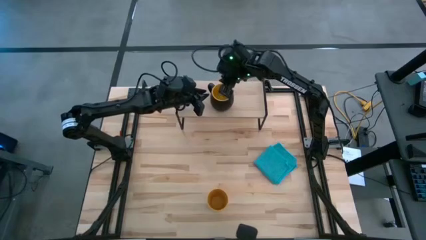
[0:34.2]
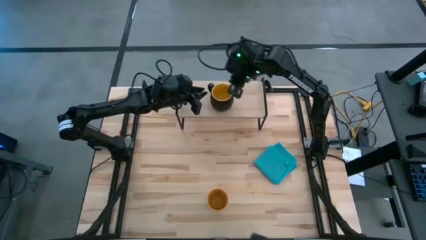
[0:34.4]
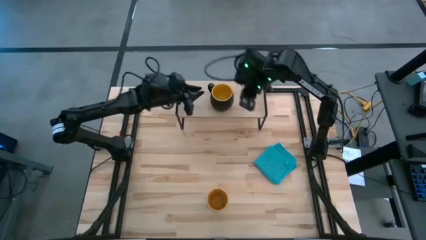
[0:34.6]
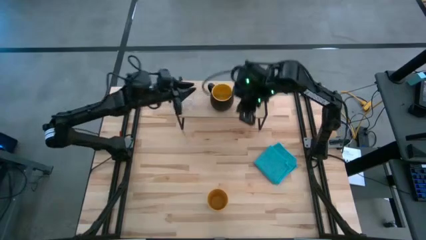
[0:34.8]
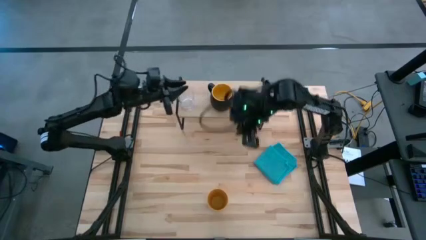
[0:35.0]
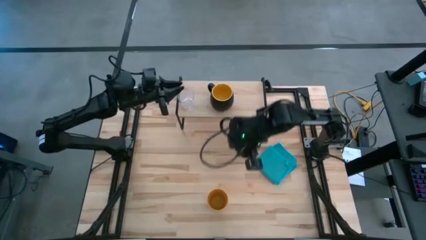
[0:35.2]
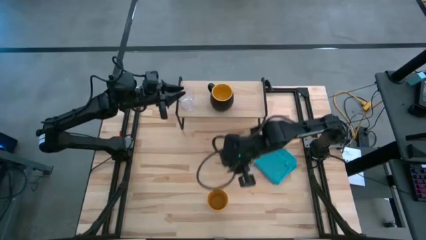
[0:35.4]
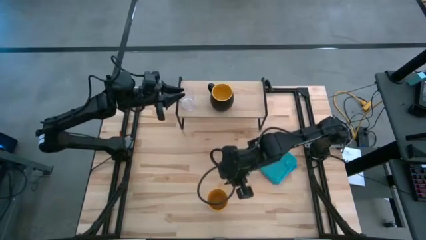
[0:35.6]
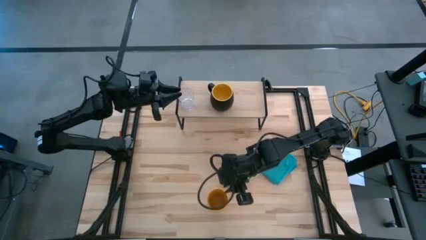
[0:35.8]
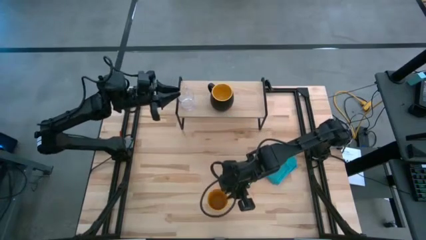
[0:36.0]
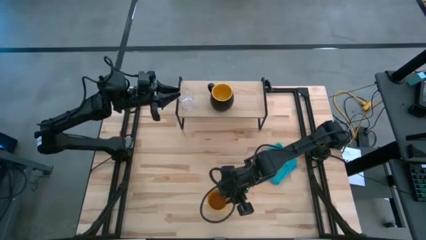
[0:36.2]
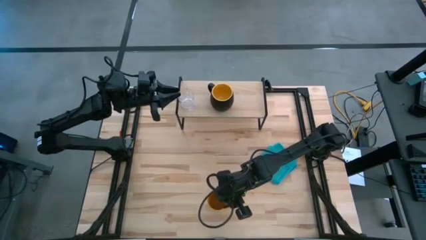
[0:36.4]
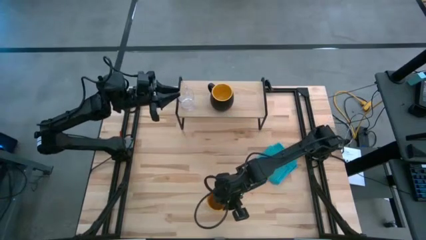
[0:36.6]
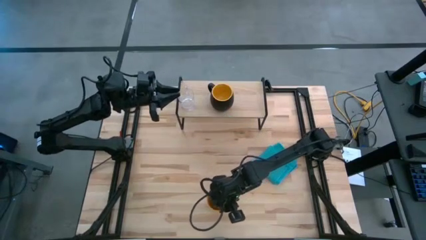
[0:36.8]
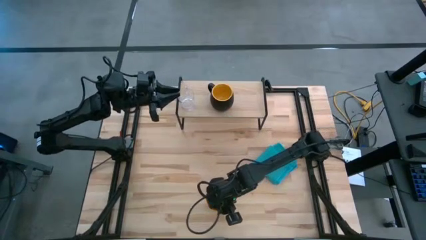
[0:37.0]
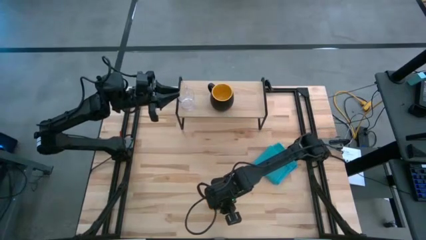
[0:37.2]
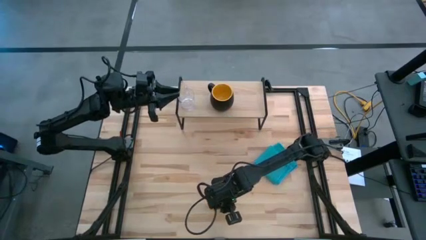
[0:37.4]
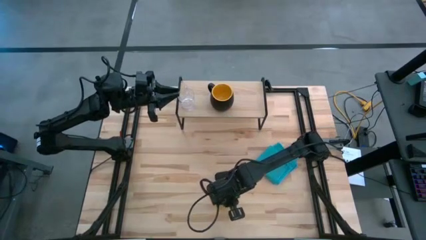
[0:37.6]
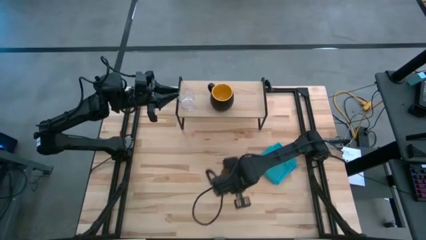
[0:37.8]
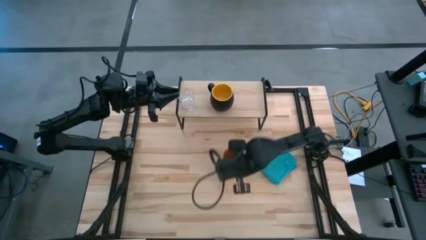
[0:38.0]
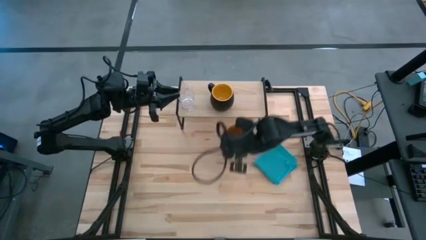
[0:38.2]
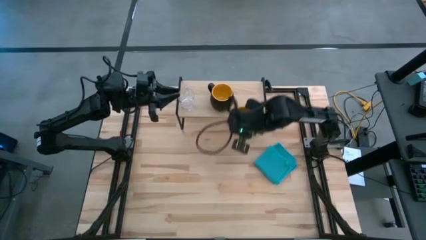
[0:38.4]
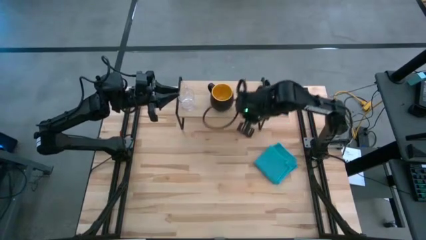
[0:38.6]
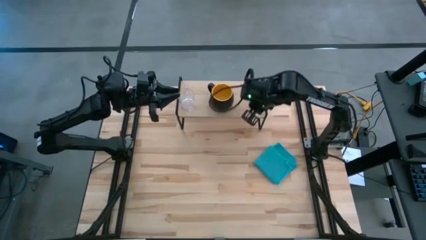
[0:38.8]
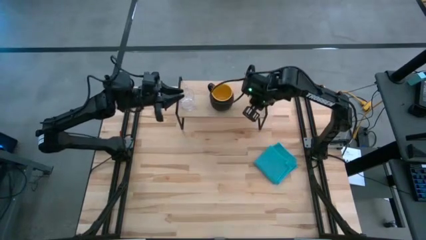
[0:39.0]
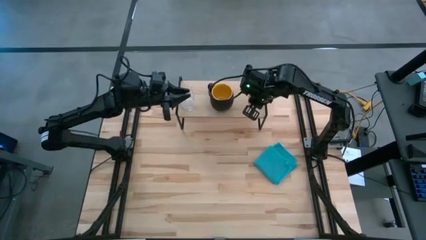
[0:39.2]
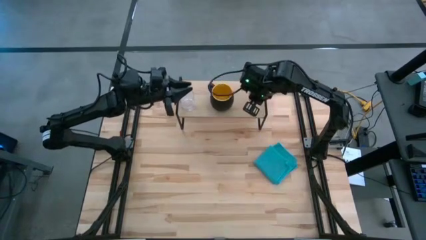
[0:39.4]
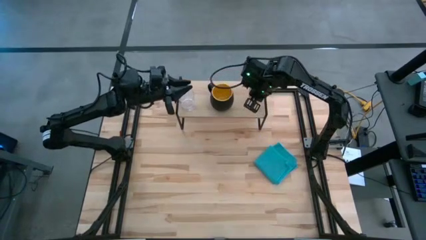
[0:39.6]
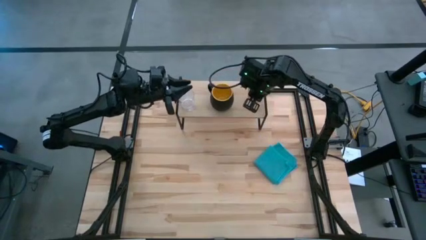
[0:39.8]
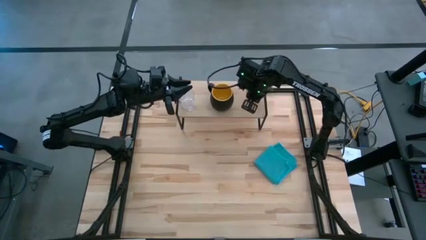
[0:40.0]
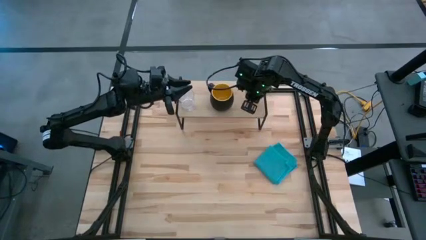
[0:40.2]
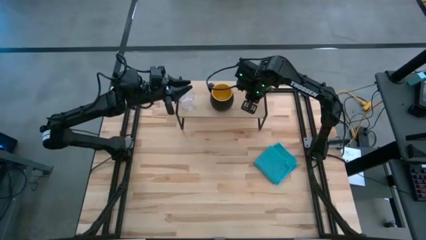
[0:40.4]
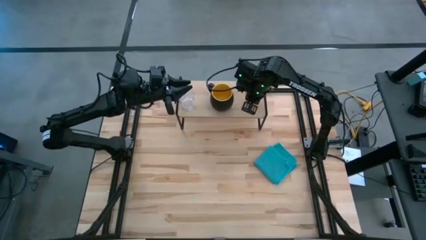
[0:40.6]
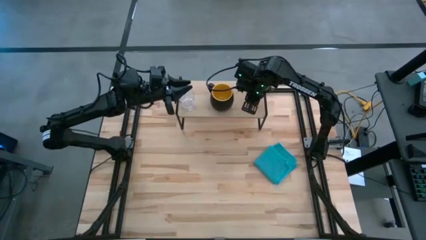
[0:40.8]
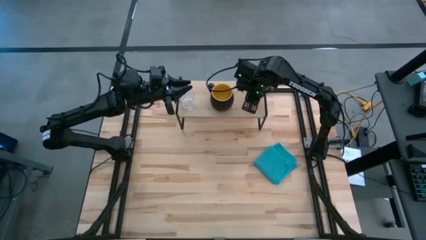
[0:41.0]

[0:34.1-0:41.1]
Task: Stack small to large cups/mugs on shelf
Put the yellow cup on the shelf

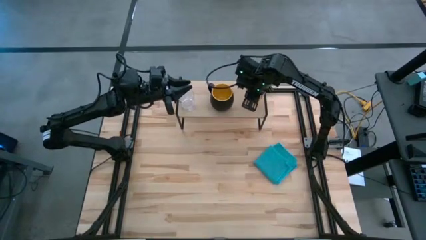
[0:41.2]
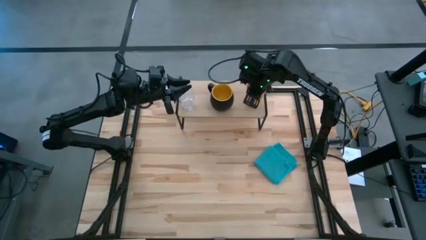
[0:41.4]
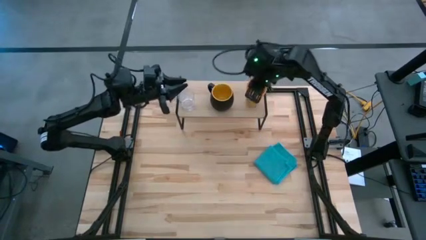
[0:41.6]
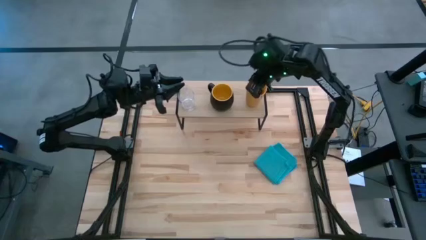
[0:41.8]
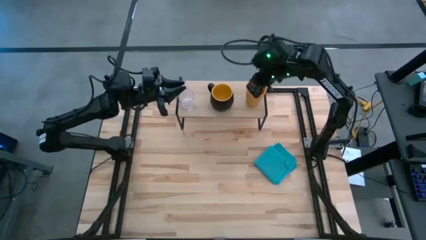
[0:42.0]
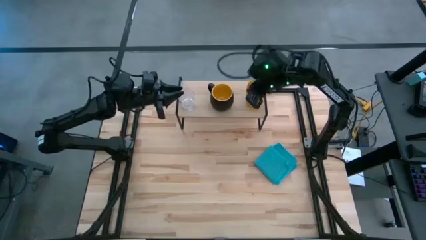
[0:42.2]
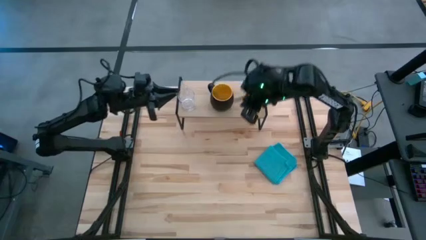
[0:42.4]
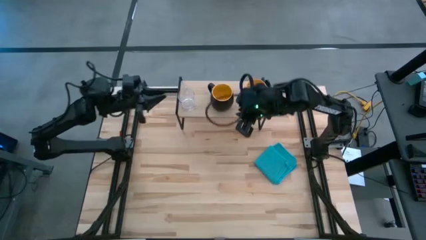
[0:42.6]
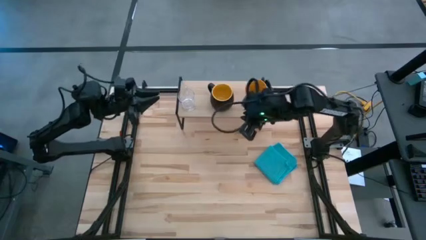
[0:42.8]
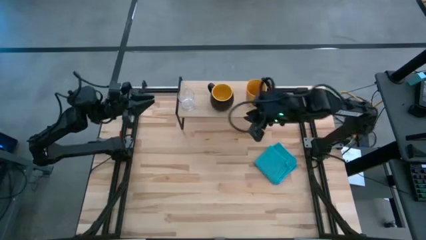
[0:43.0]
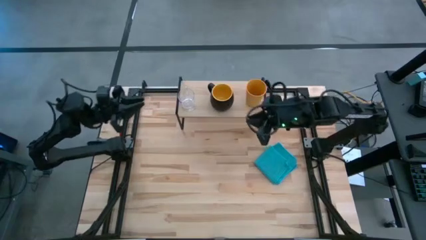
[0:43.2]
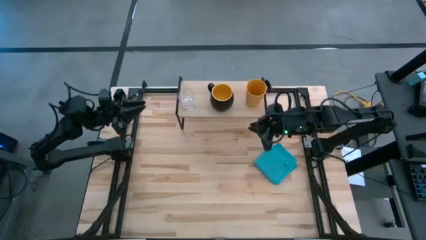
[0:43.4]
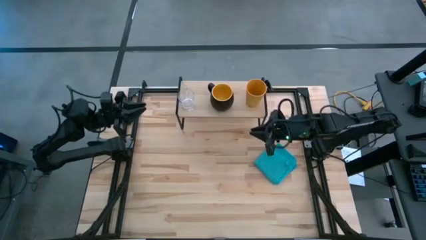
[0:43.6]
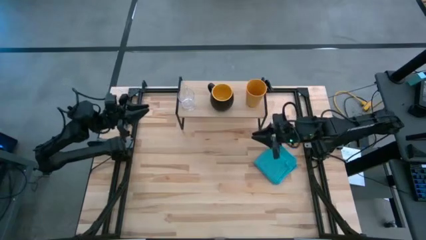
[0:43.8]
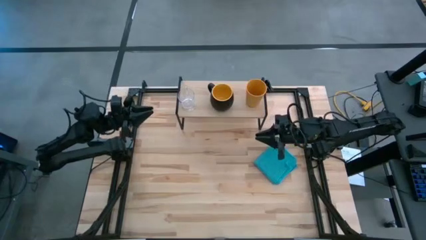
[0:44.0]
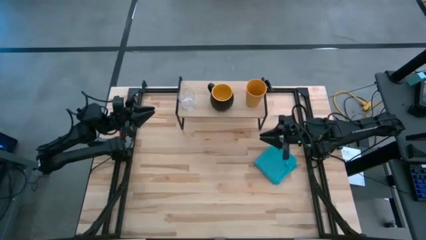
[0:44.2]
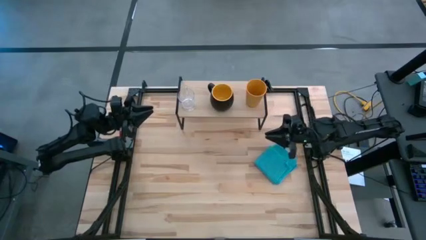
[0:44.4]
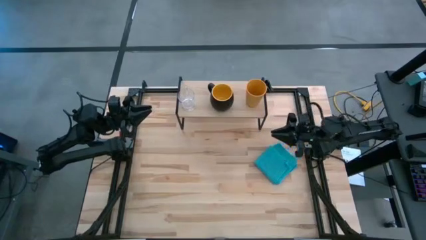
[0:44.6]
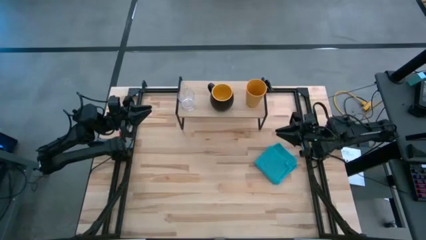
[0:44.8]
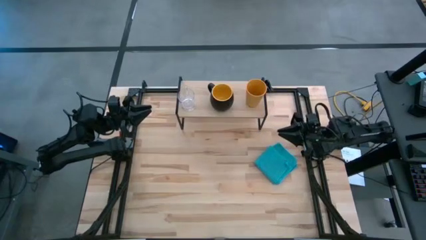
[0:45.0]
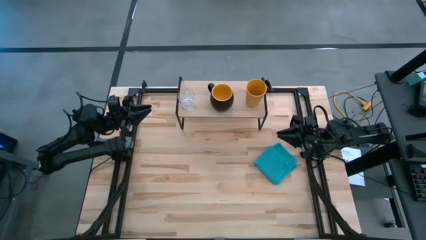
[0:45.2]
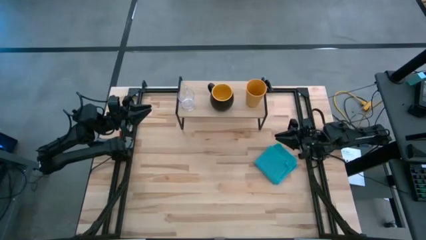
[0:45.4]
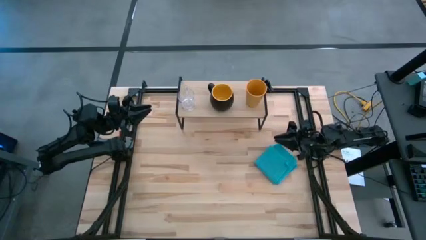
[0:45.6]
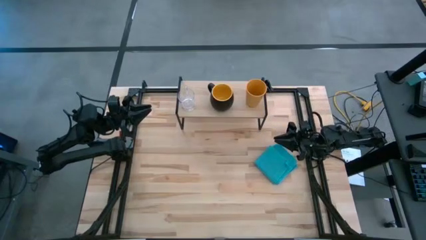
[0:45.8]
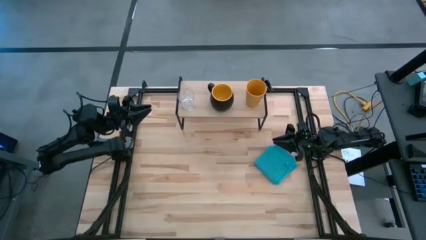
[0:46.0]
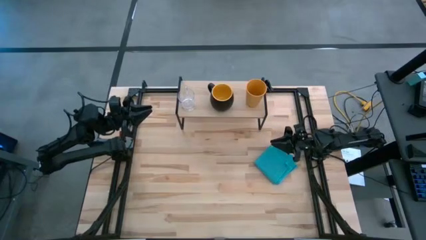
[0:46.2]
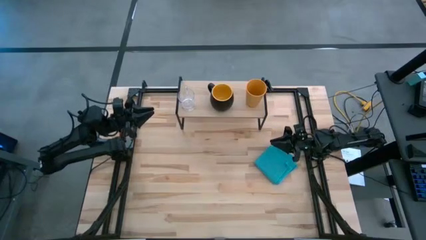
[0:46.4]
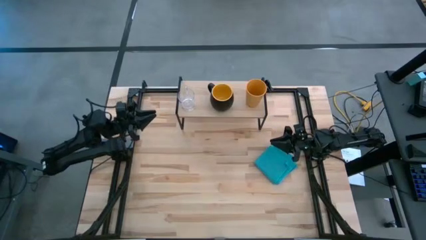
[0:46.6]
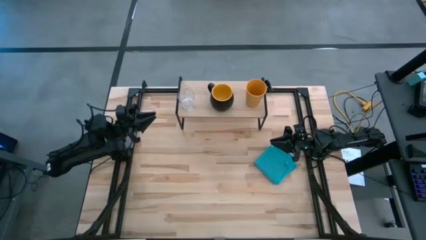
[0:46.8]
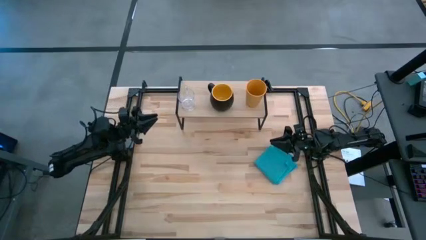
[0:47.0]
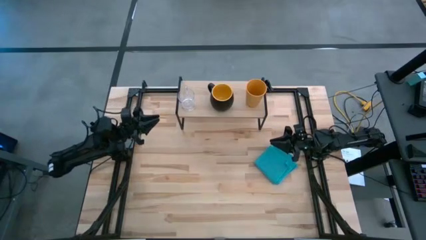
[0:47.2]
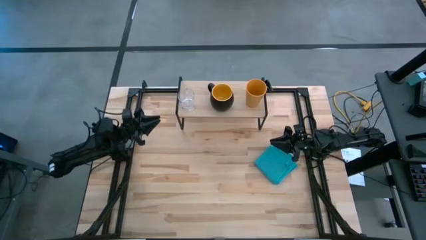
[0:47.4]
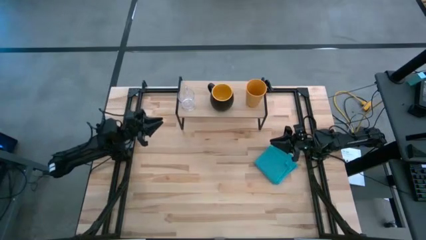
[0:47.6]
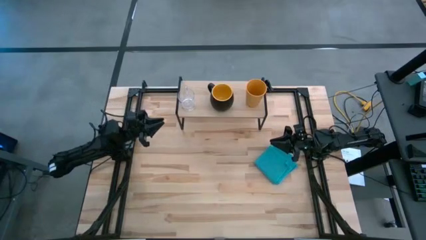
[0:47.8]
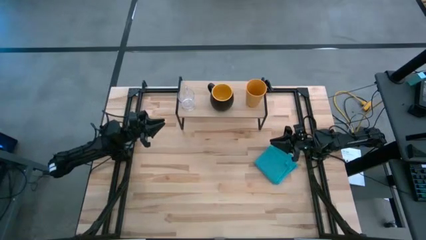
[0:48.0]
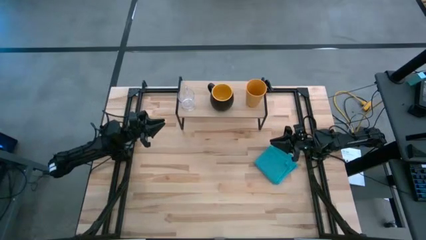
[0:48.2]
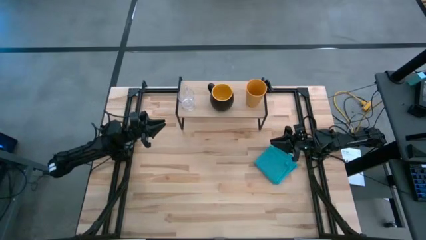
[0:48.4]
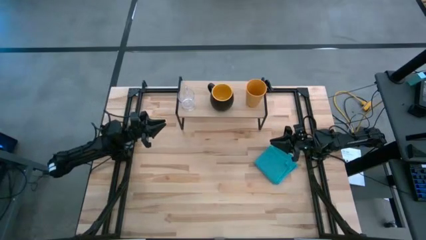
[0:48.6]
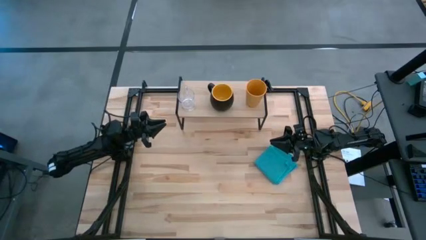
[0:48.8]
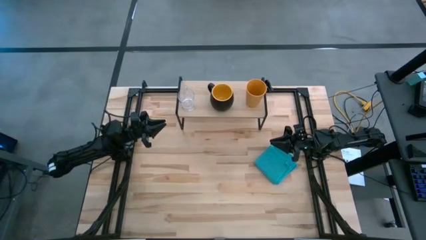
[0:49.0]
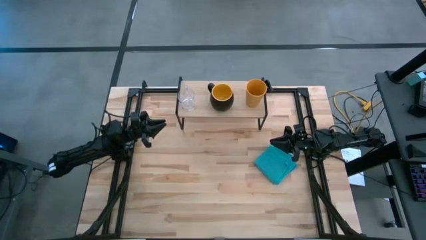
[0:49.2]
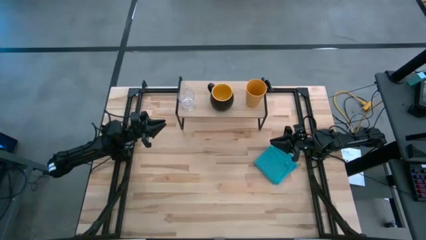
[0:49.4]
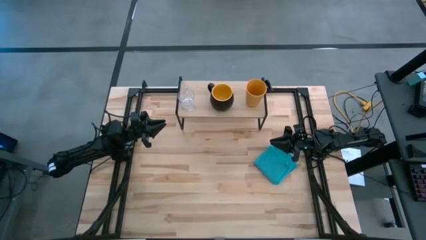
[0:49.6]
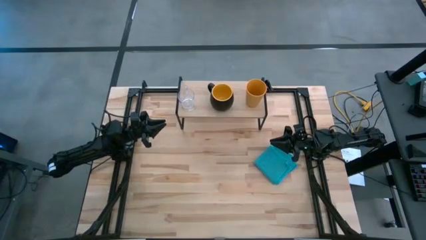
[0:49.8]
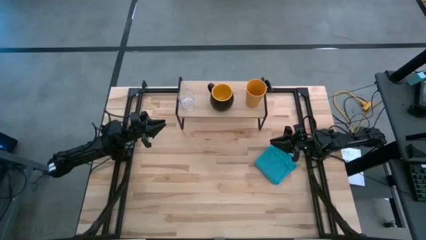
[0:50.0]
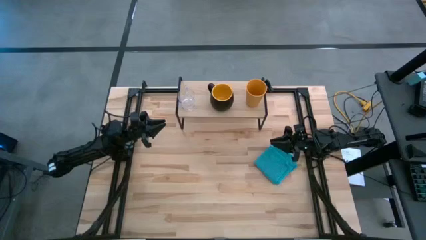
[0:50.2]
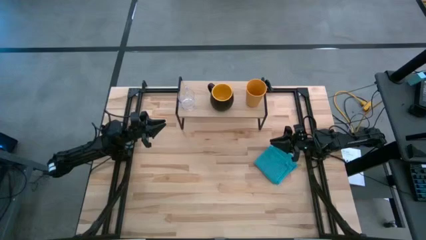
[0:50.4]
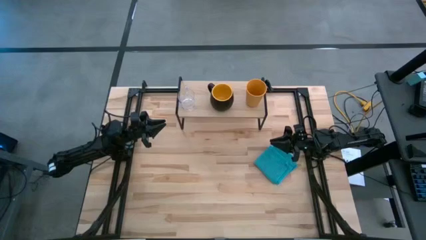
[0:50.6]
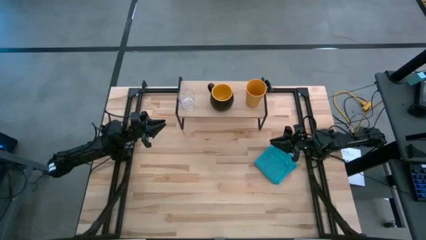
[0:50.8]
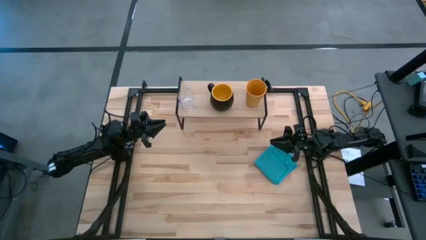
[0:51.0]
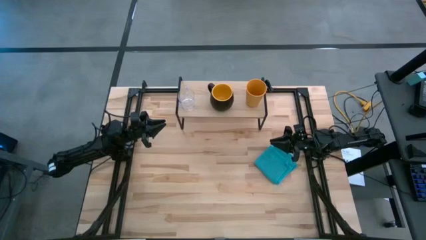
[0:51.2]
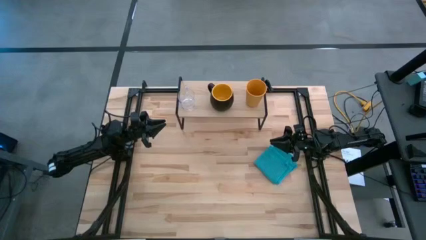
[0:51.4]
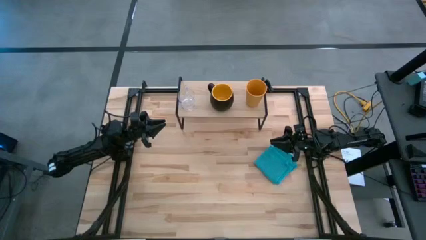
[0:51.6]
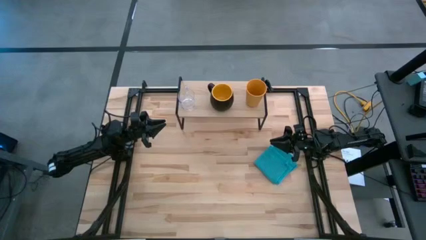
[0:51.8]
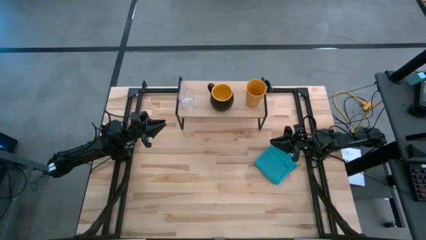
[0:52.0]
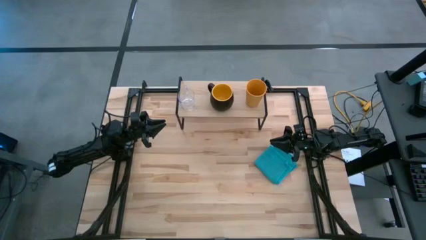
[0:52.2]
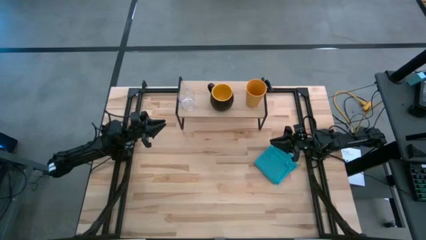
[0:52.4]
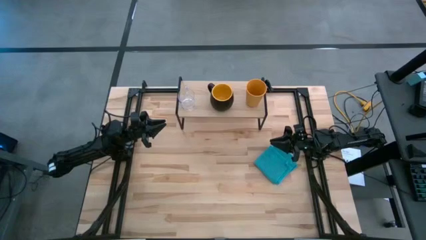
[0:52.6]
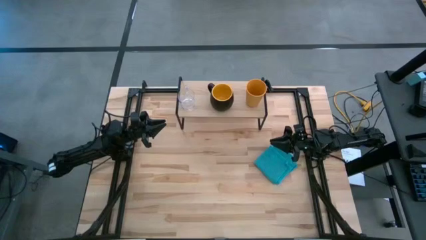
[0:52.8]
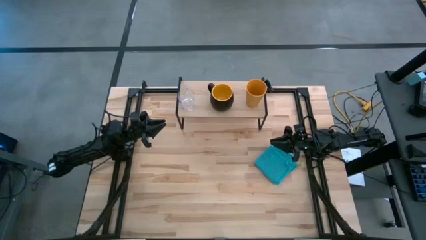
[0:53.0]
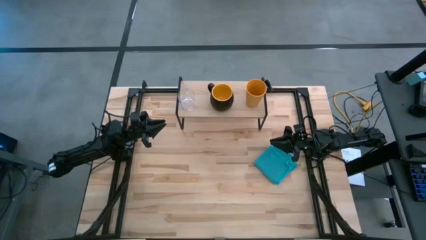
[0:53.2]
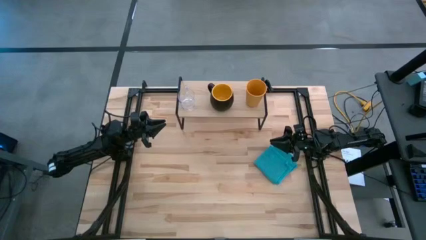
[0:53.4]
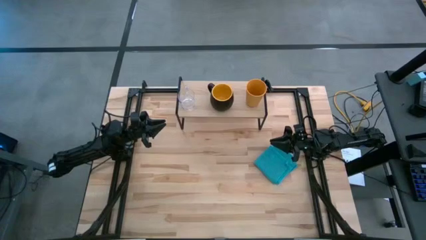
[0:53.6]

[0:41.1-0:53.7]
Return to Home Position
